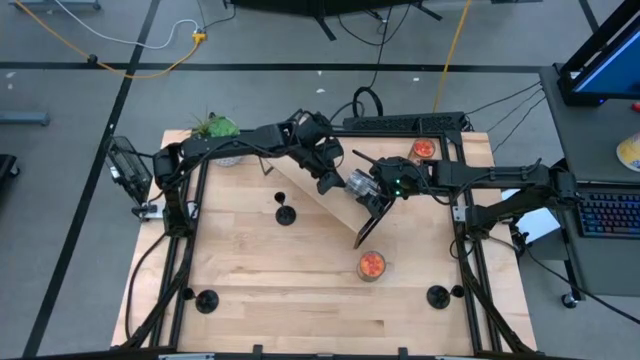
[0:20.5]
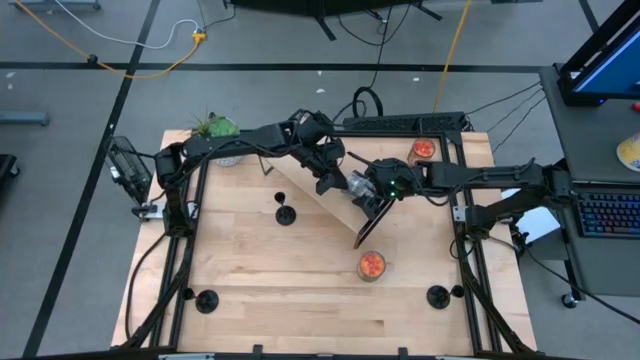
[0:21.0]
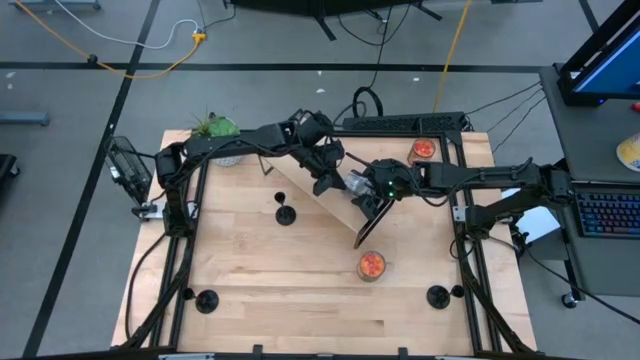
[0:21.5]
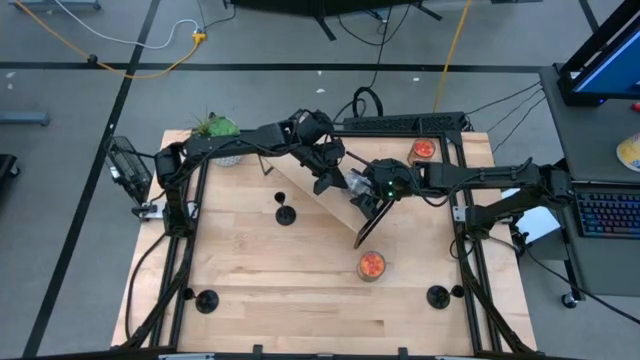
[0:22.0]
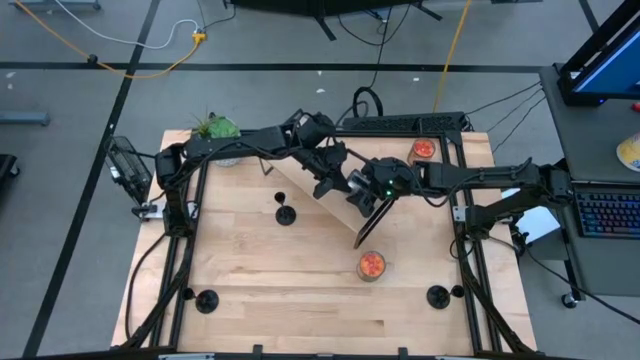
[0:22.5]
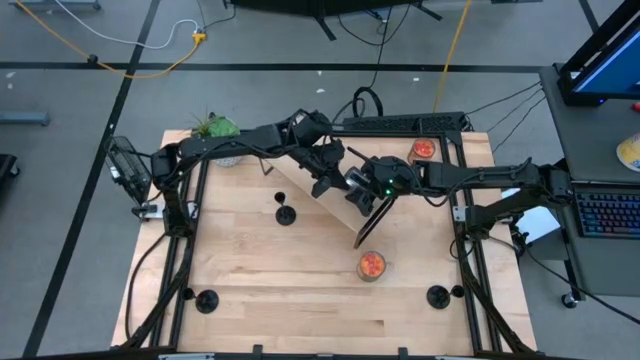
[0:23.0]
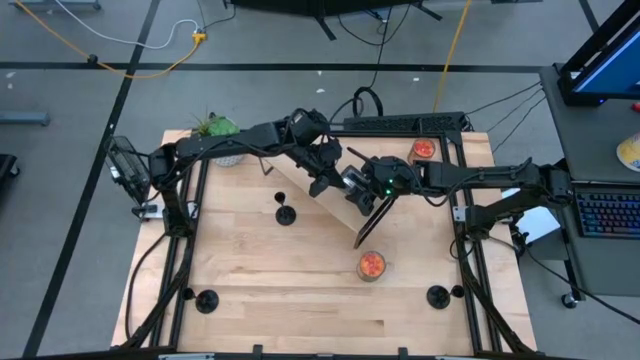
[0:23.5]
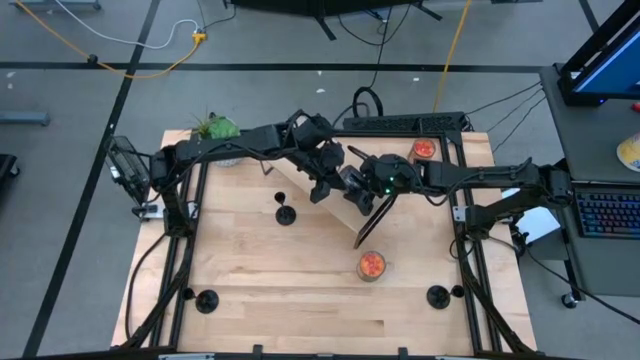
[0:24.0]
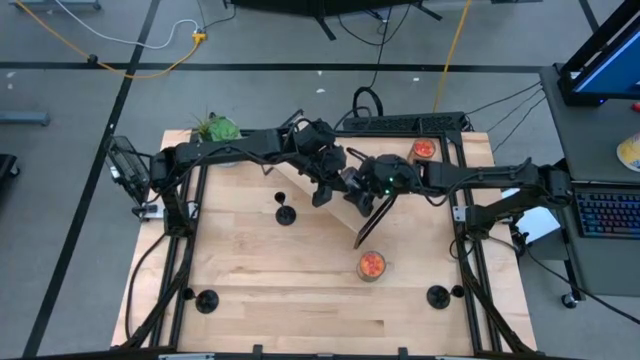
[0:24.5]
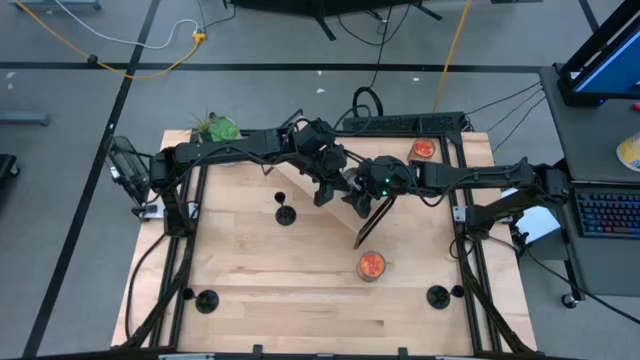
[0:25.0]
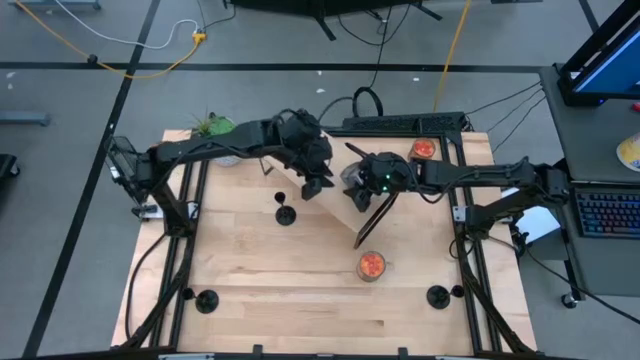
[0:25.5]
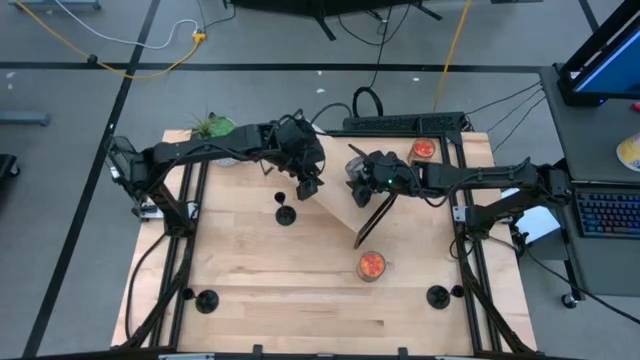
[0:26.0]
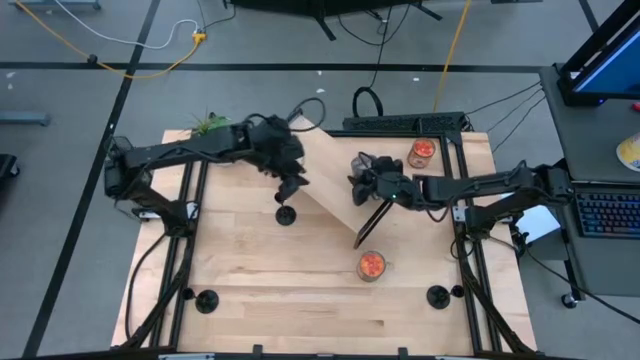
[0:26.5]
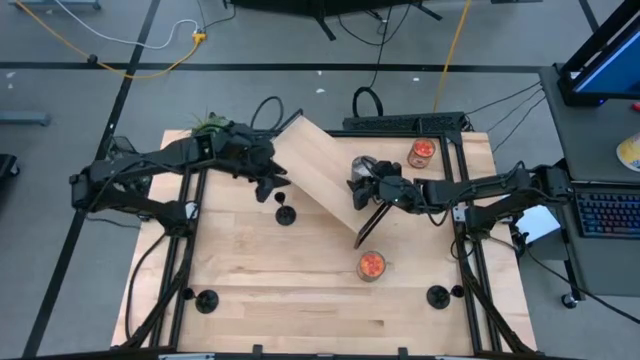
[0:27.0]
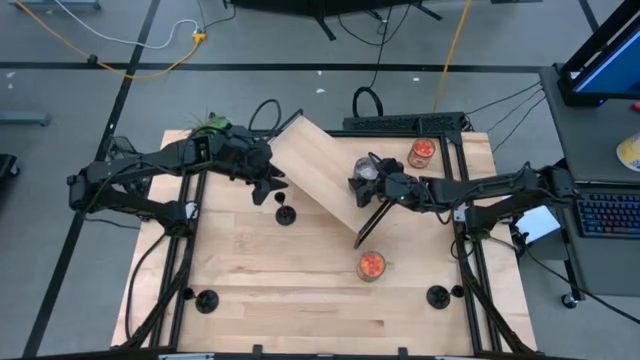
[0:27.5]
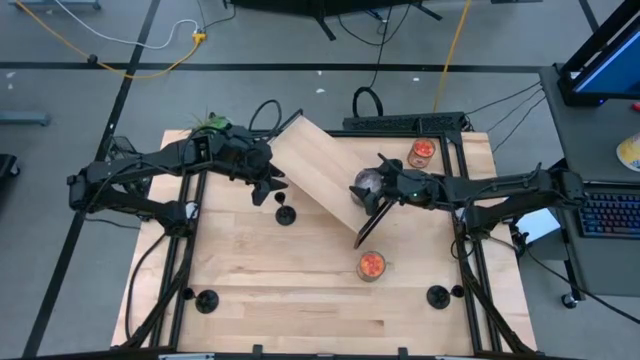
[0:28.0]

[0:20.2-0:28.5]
Task: Pick & Place candle stick holders
Put the brown scented candle on the shelf

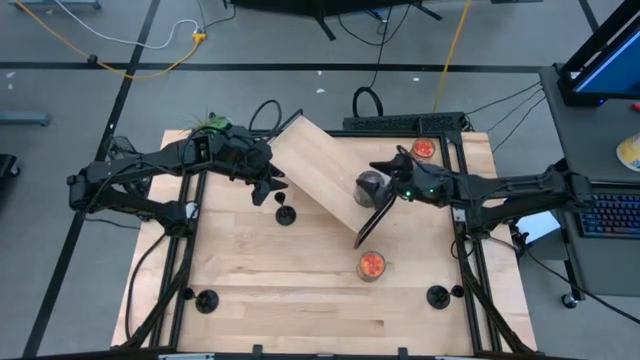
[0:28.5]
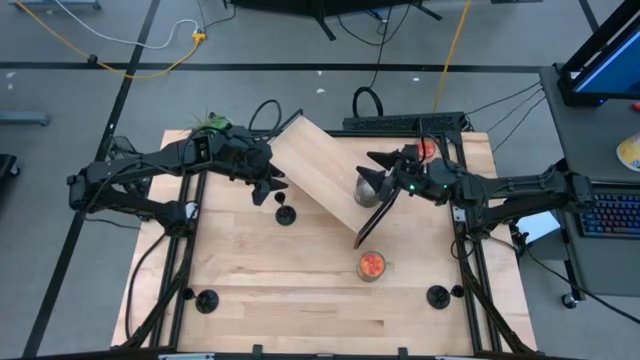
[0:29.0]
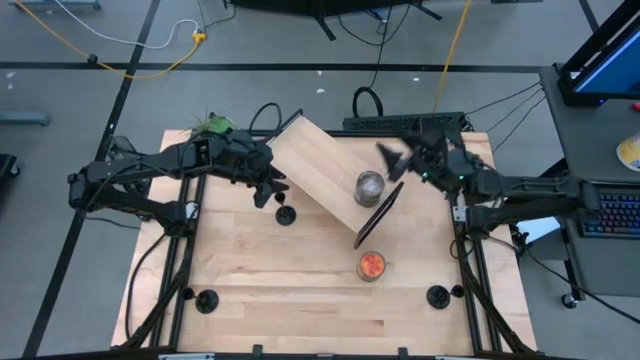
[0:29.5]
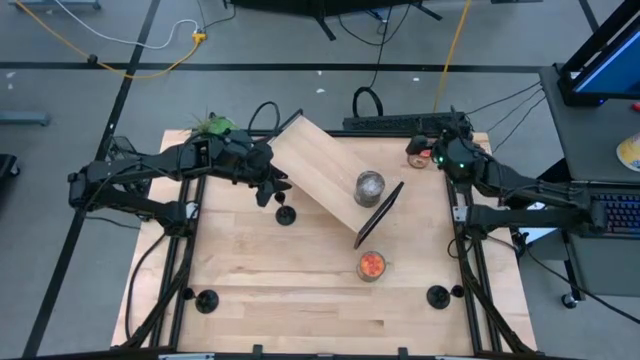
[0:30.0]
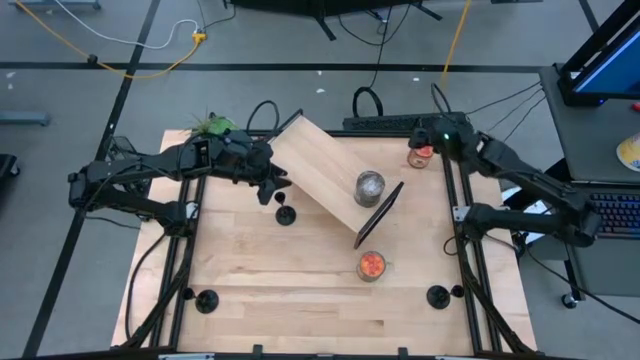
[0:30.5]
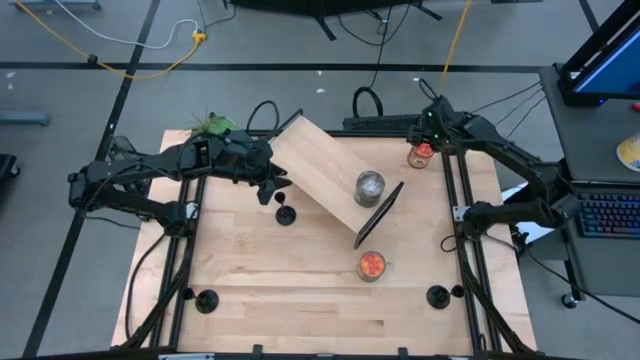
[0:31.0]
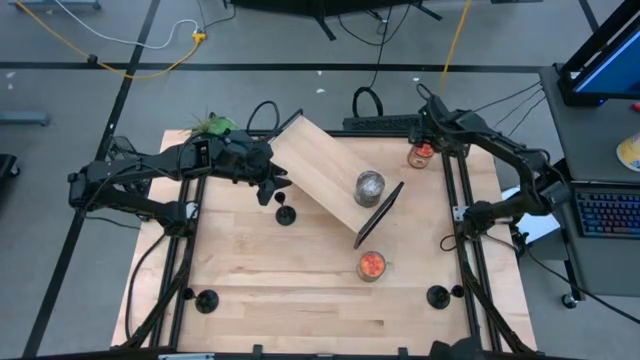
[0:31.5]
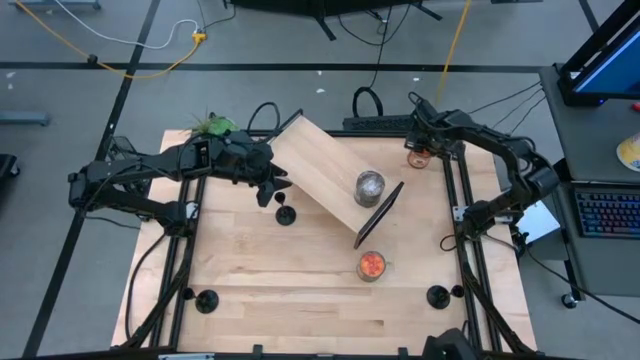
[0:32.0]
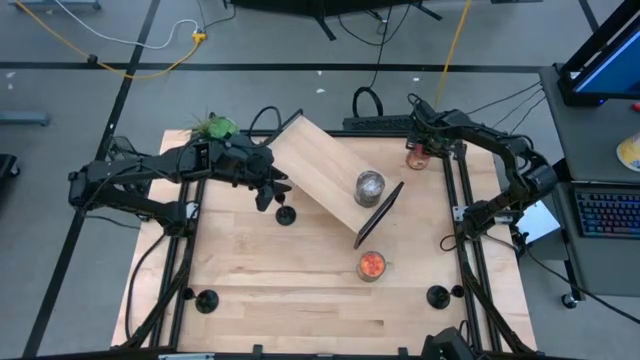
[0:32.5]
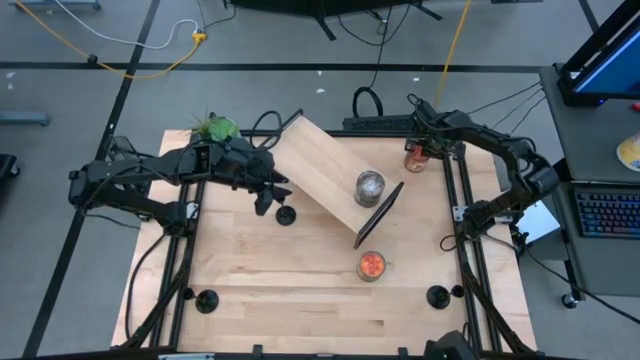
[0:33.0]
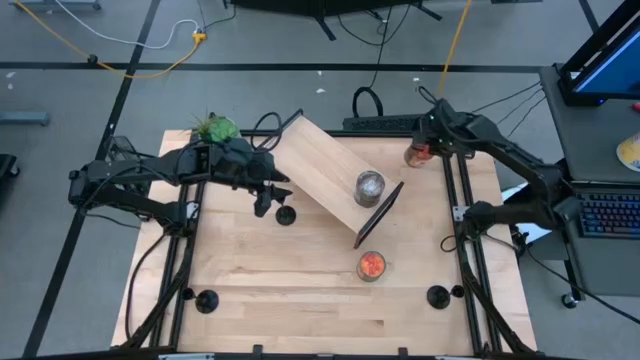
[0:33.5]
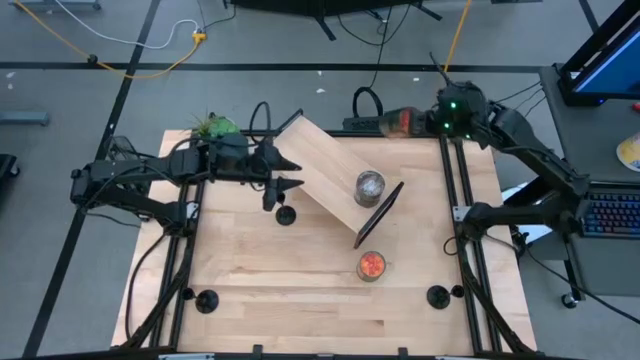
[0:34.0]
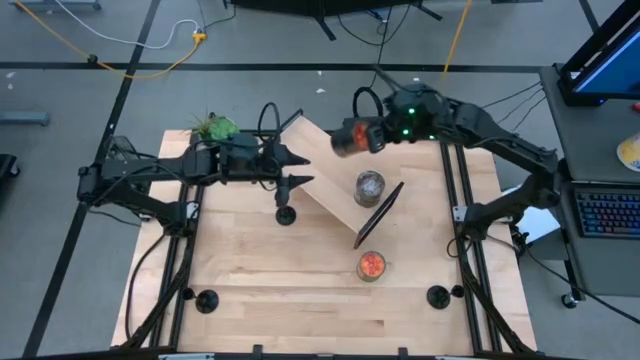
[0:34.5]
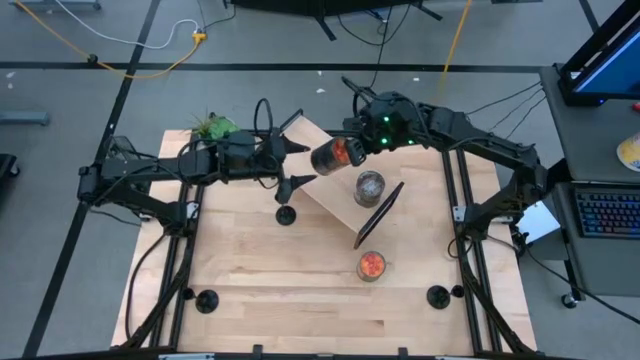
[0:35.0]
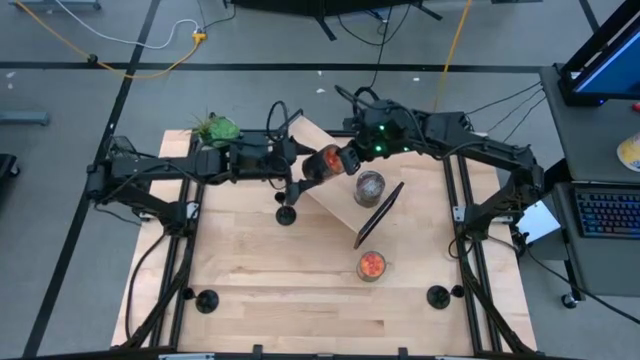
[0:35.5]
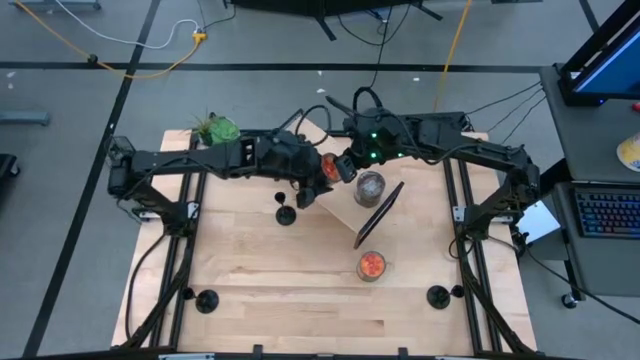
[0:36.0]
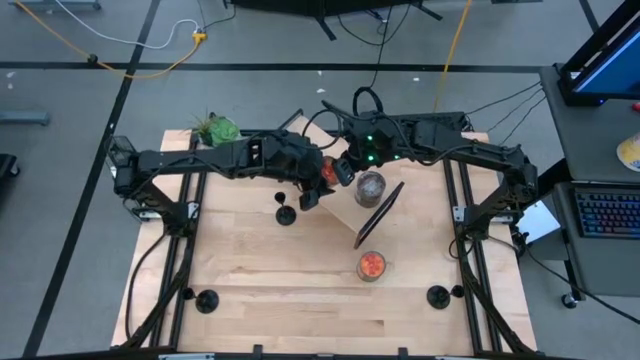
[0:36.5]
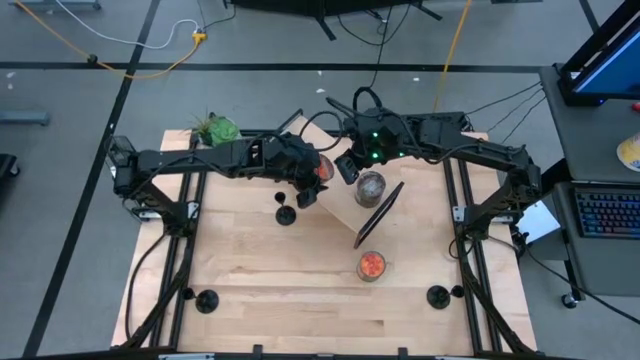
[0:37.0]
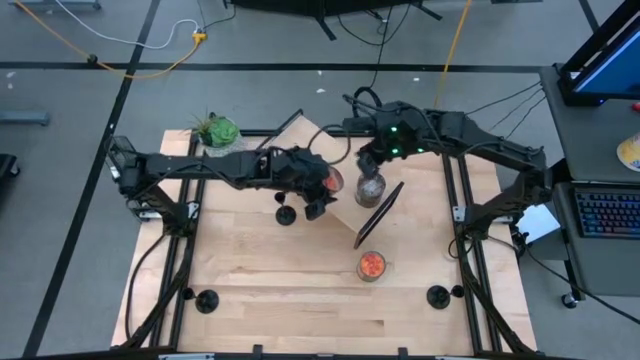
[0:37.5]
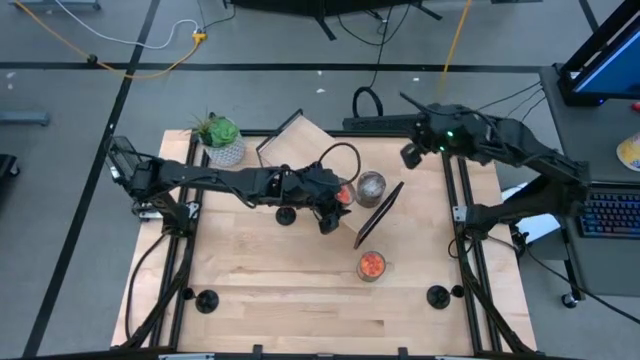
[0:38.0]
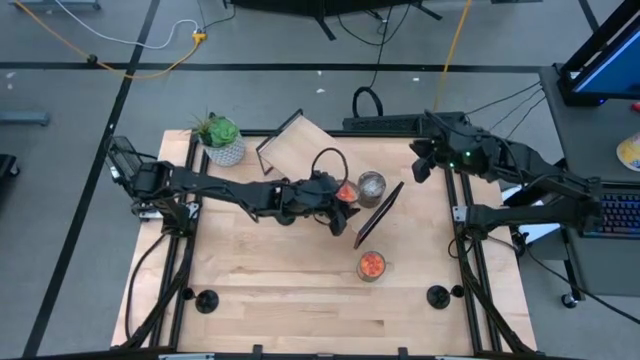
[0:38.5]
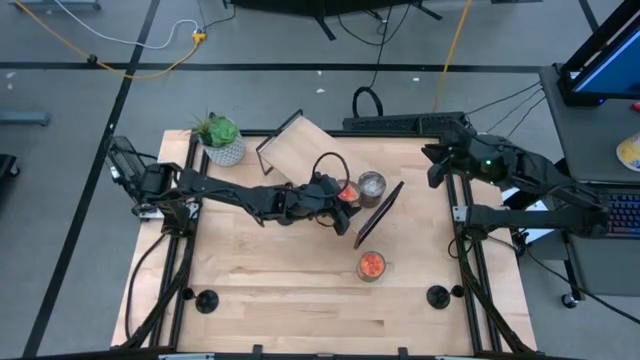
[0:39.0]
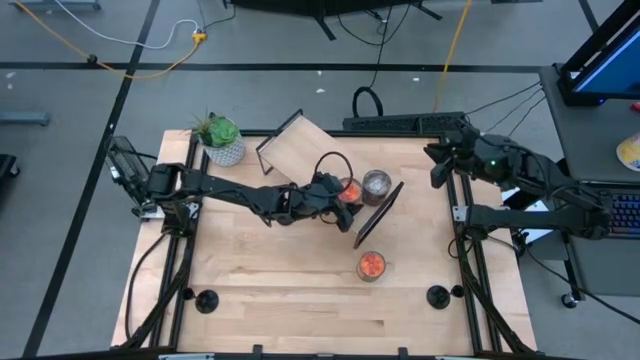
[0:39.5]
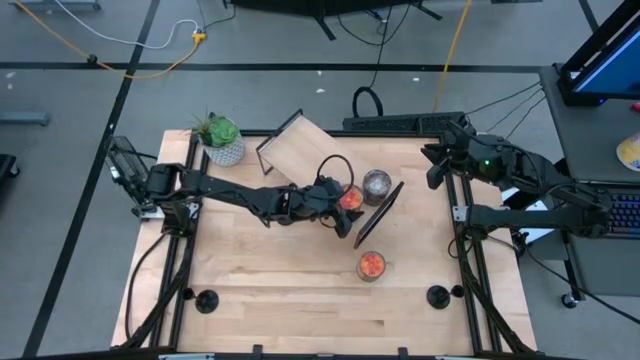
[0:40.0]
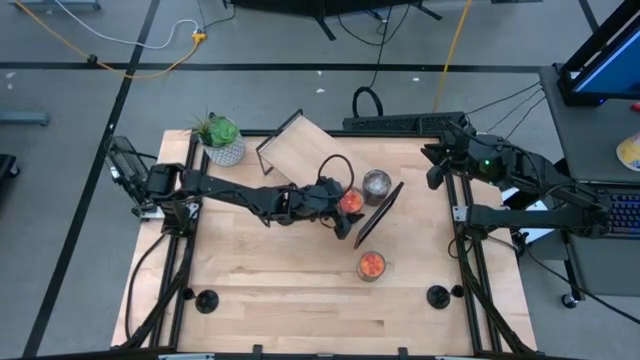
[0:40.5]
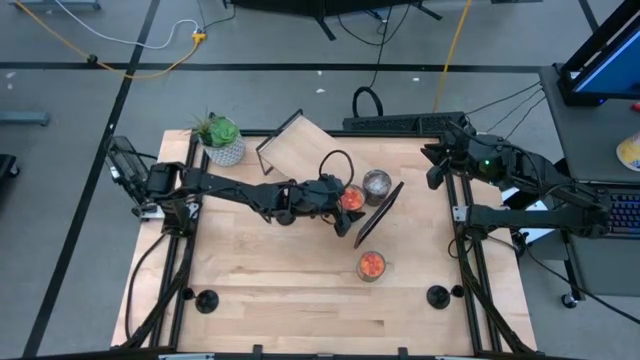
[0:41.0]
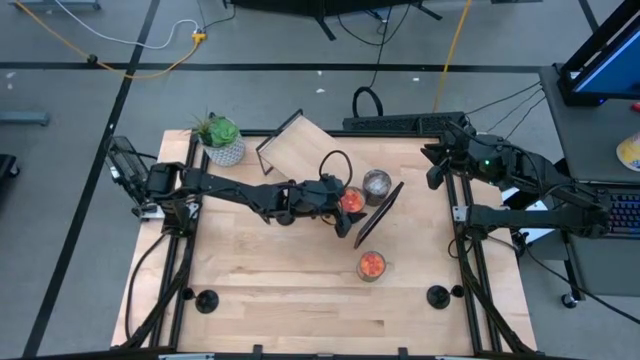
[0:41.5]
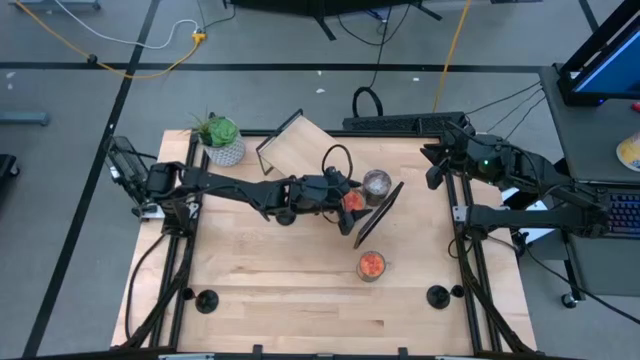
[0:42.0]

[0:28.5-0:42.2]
Put the top orange scented candle on the shelf
